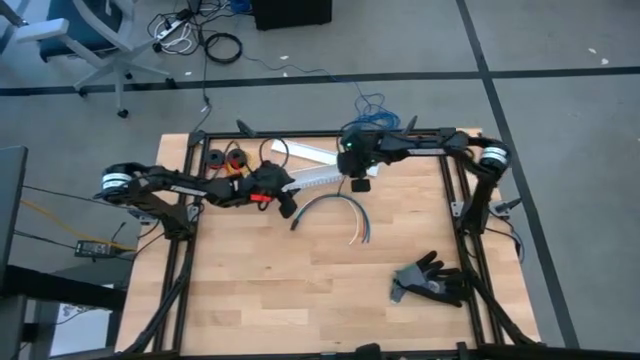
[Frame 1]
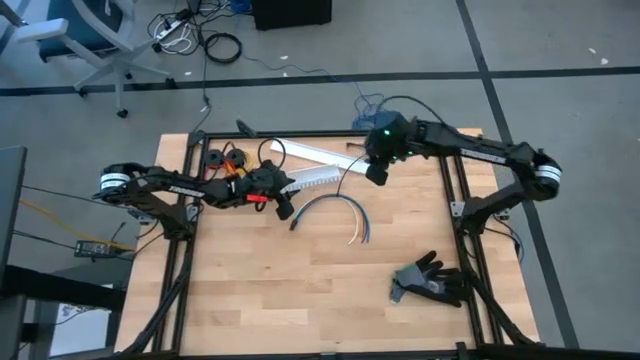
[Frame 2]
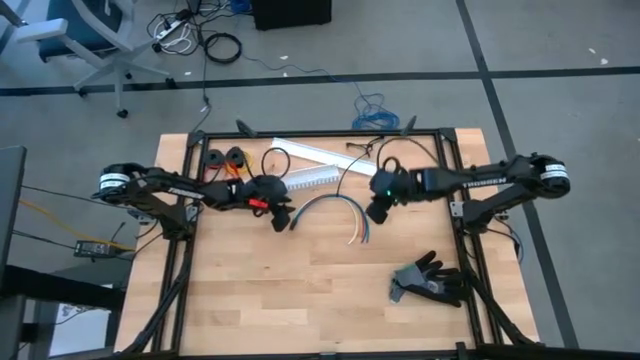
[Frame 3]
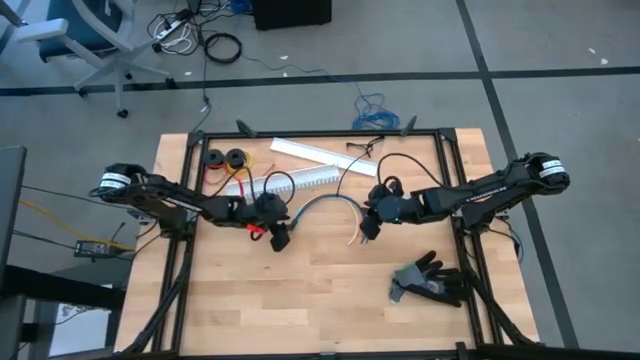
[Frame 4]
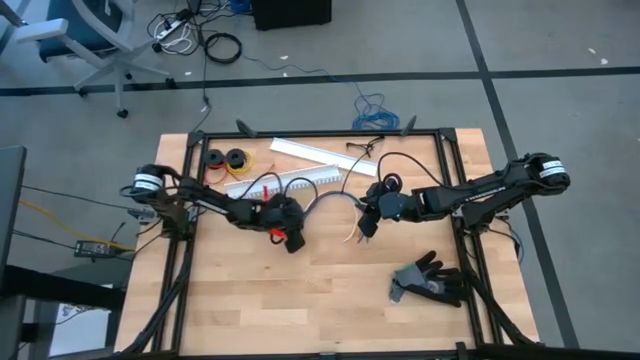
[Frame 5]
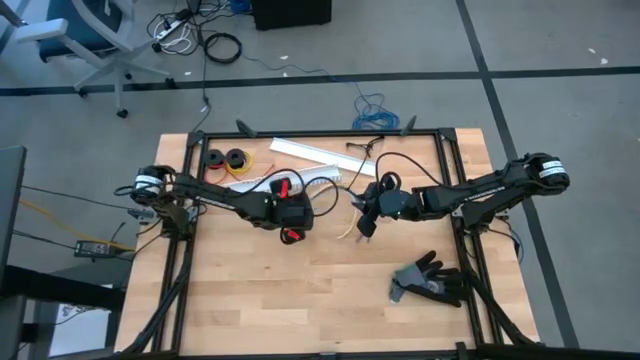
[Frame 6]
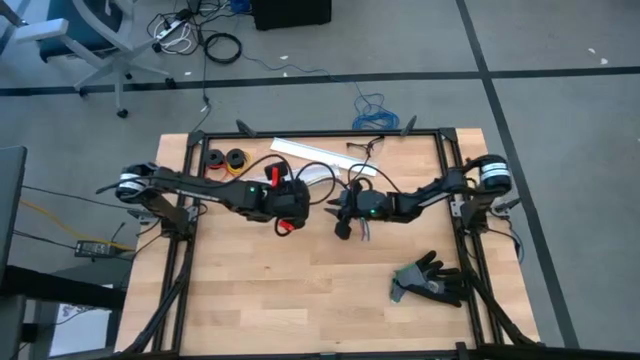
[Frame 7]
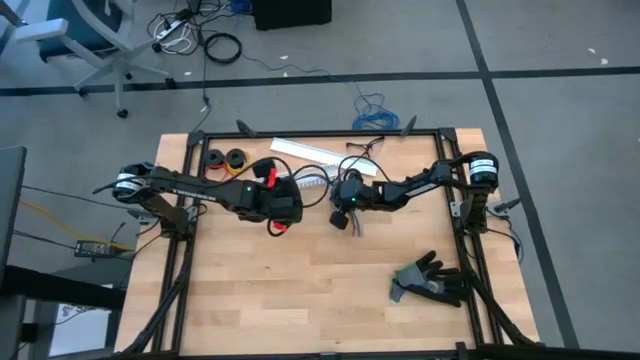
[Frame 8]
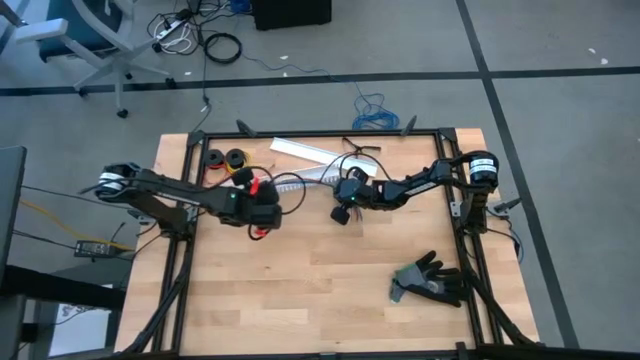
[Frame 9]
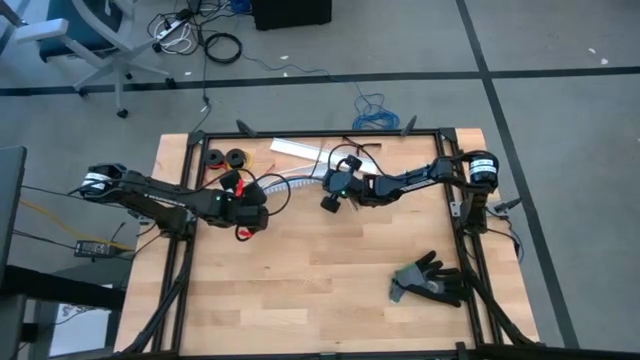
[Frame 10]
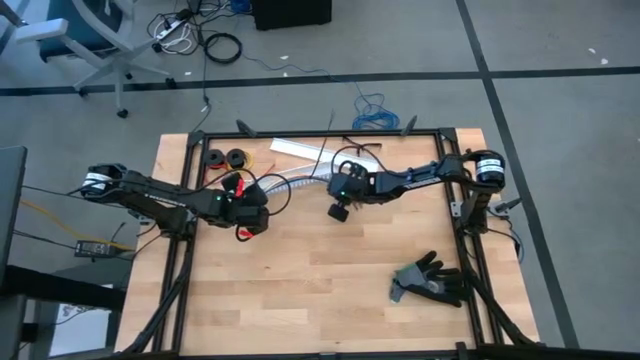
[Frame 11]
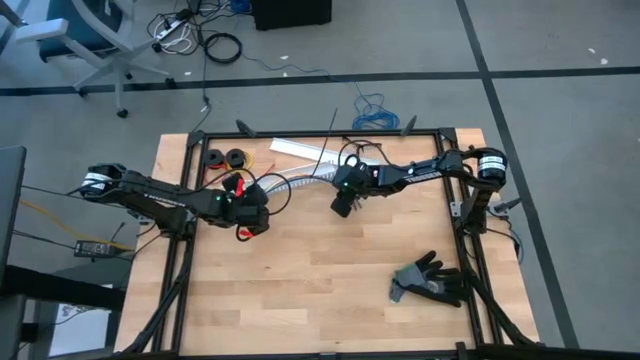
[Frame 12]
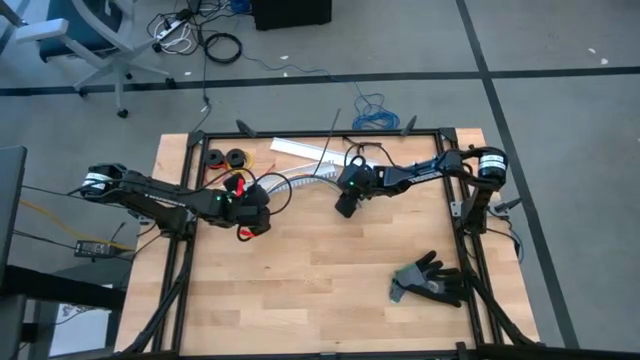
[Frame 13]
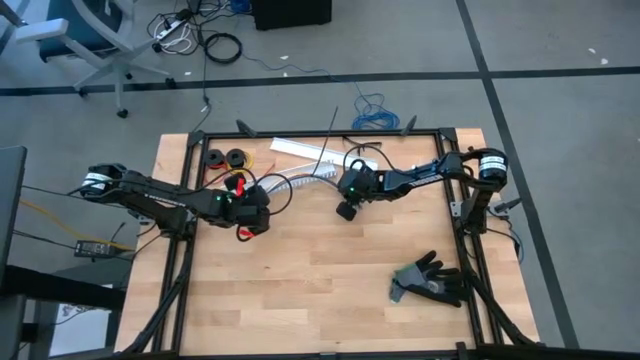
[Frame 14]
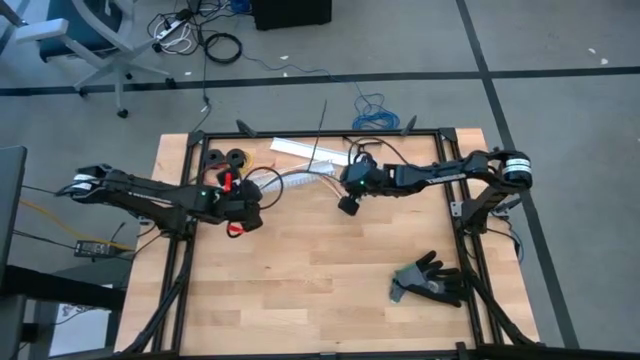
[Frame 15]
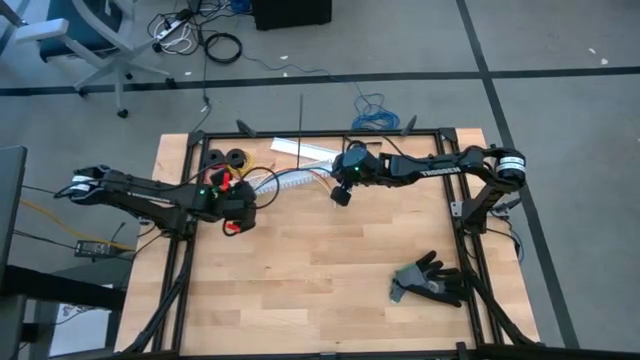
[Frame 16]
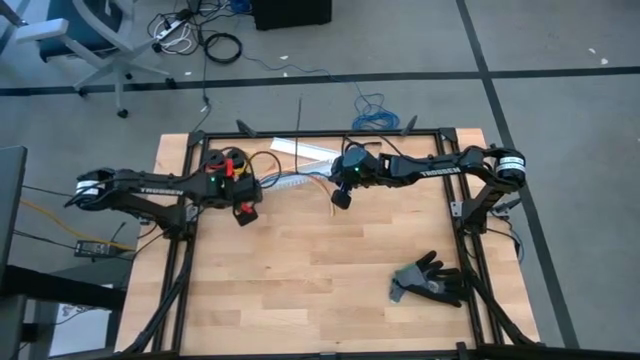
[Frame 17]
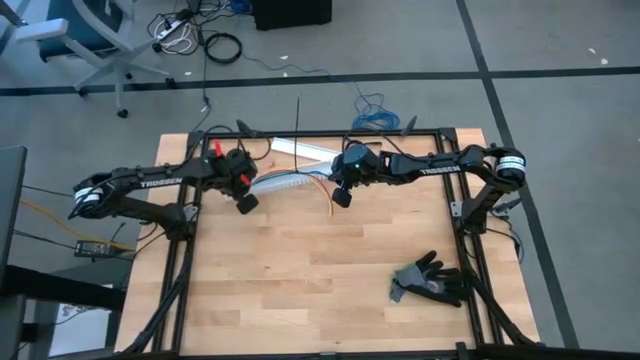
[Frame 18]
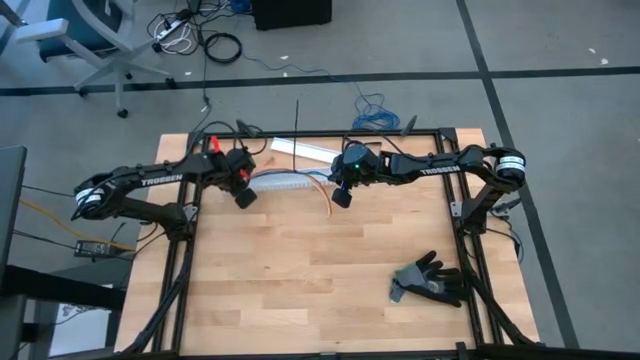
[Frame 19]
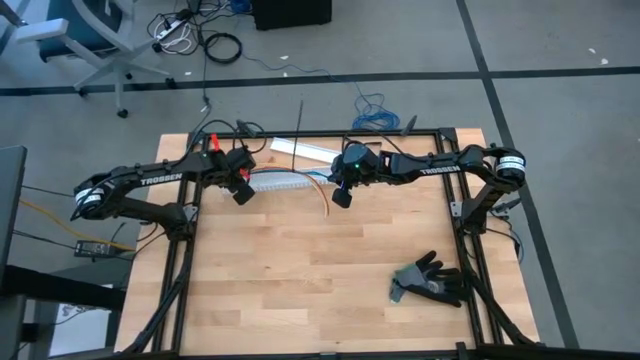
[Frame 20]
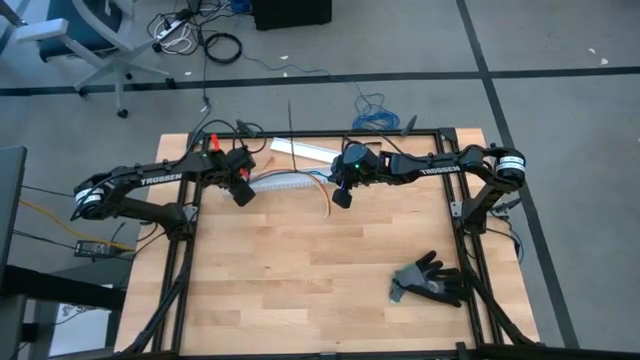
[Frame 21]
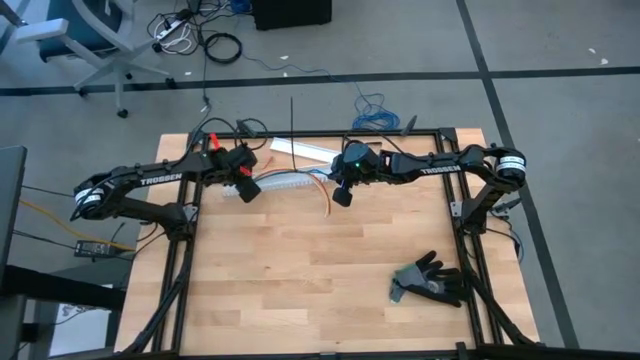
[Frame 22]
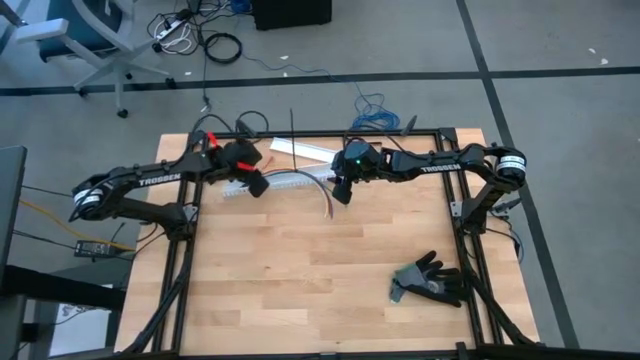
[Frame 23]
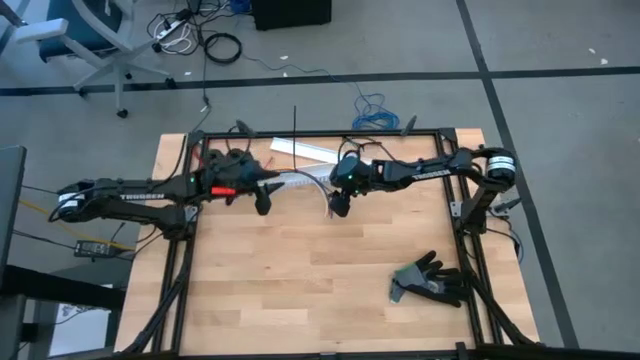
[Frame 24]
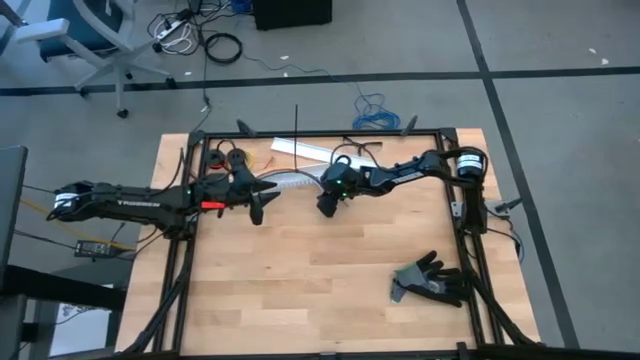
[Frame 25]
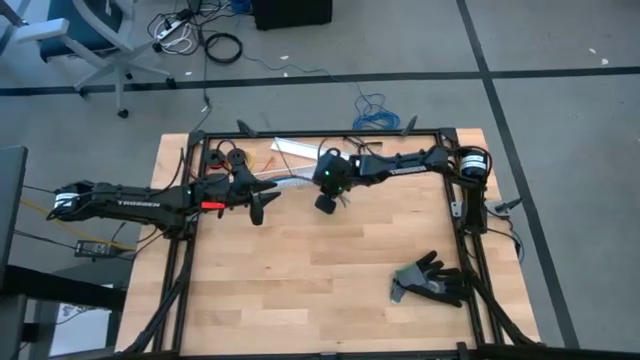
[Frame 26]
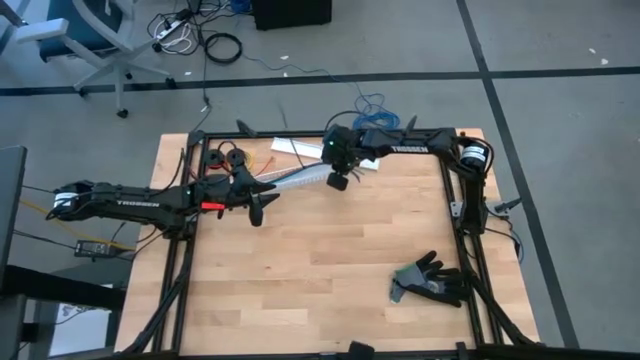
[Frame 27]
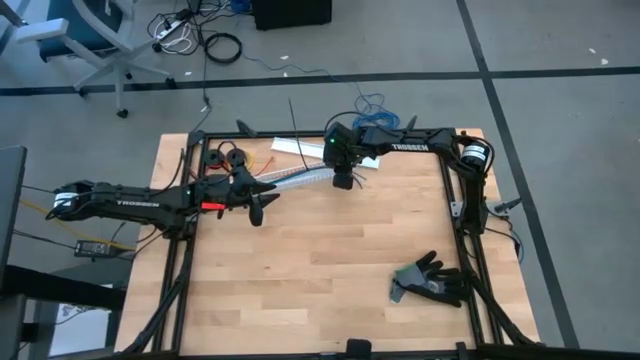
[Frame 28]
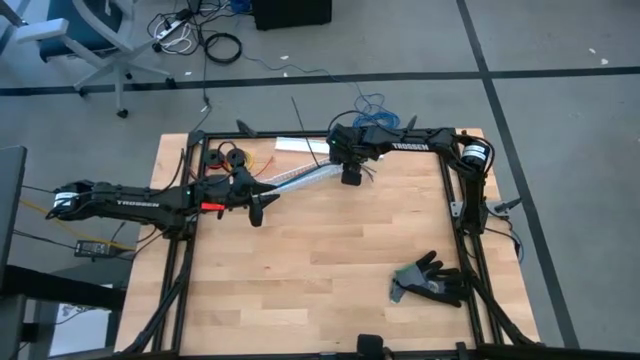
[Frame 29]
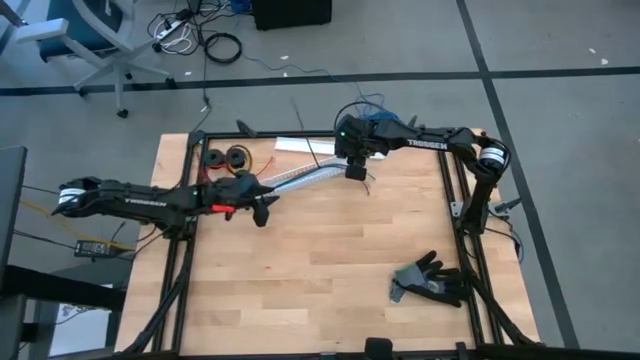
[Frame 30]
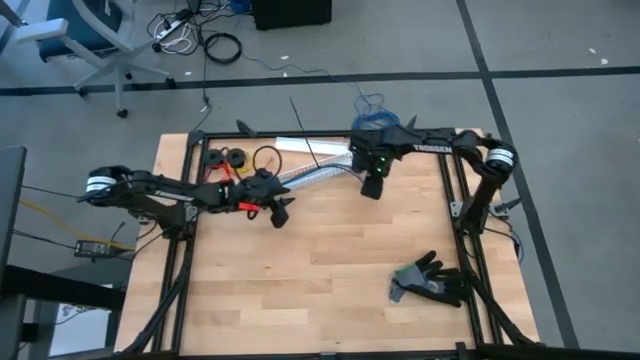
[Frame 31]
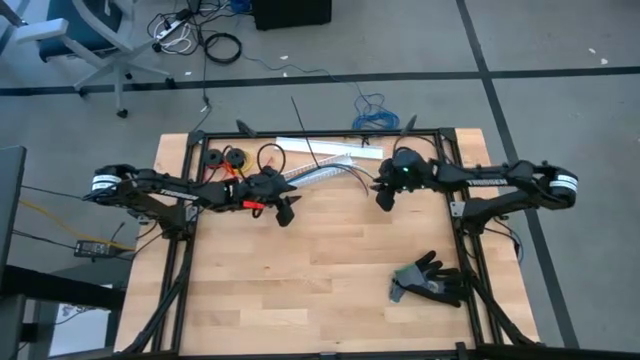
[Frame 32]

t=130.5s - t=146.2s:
Task: Ziptie cables
Put the zip tied cables in the cable duct

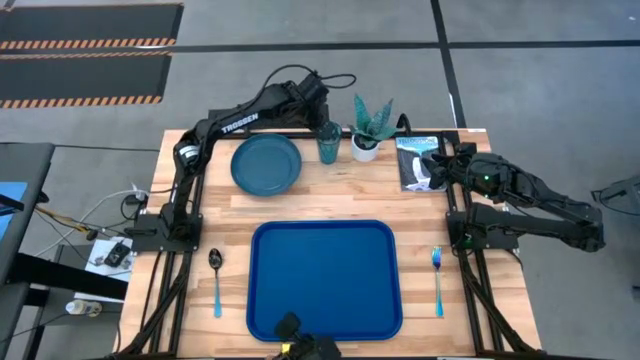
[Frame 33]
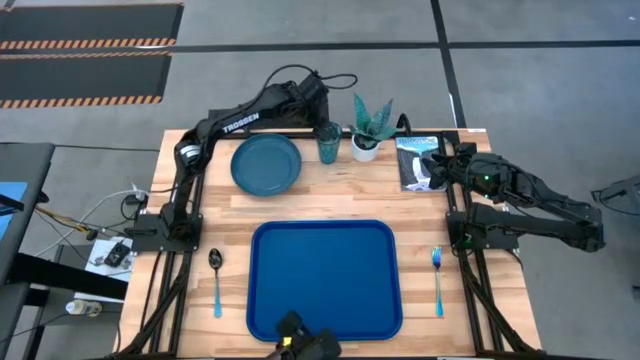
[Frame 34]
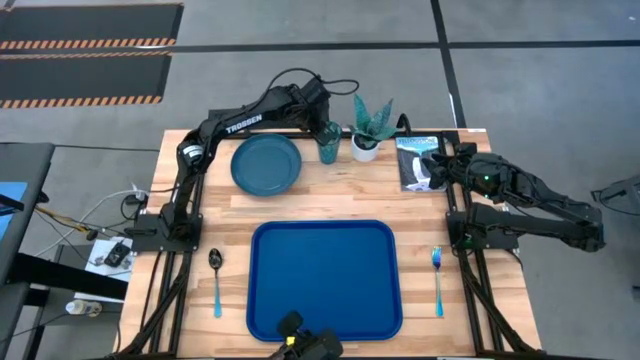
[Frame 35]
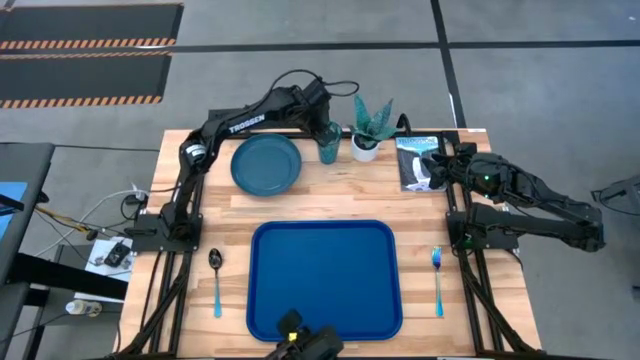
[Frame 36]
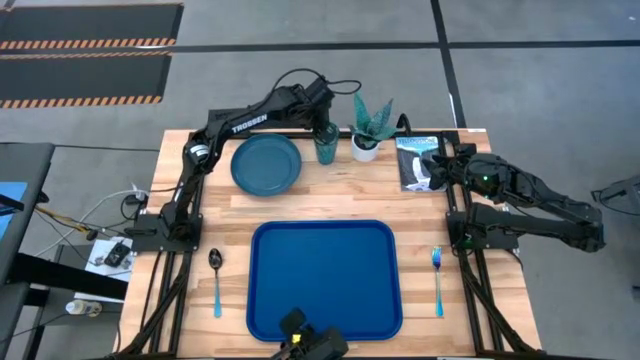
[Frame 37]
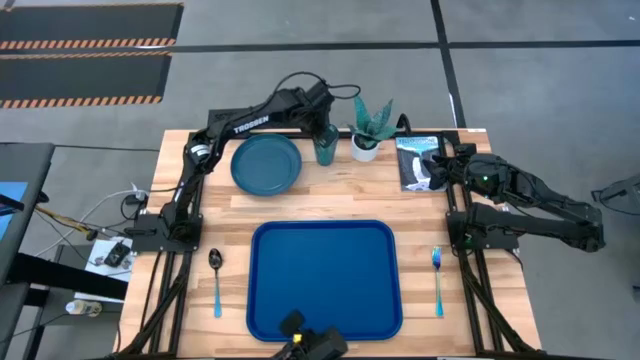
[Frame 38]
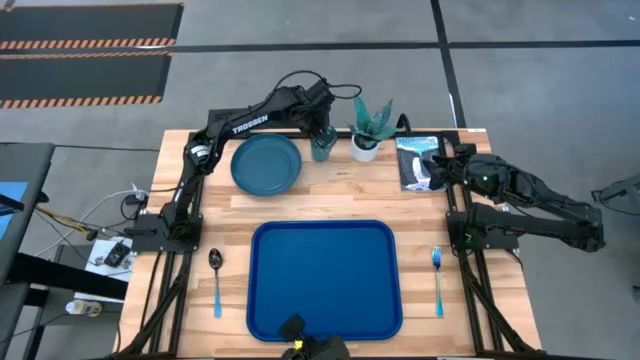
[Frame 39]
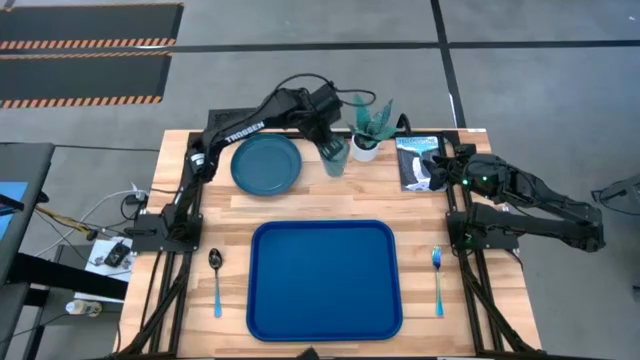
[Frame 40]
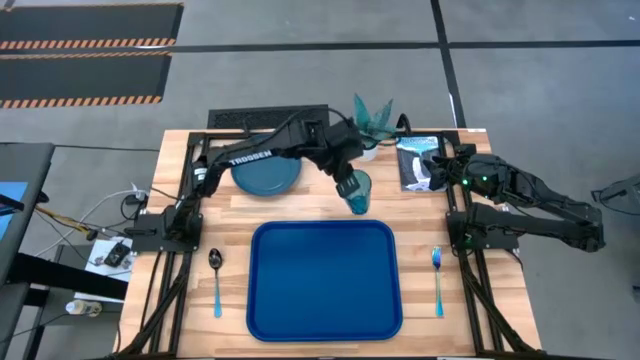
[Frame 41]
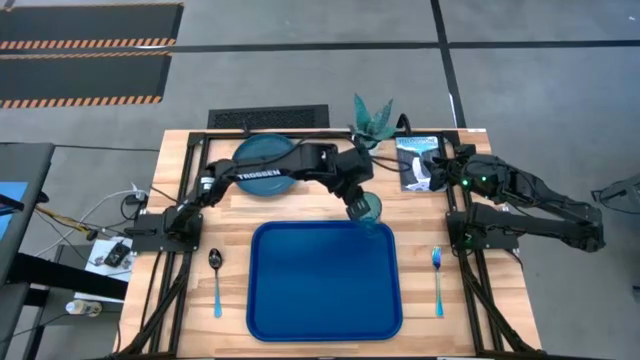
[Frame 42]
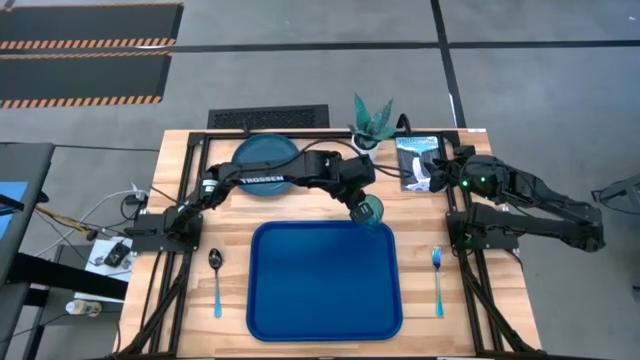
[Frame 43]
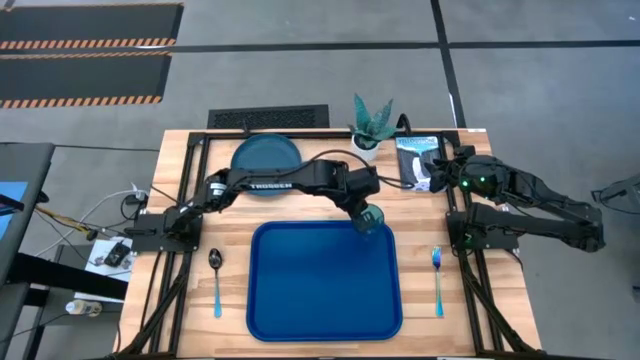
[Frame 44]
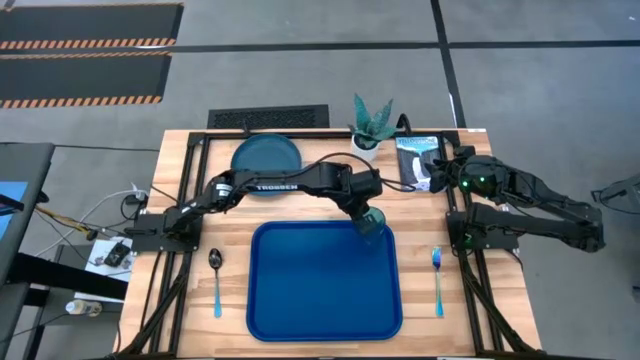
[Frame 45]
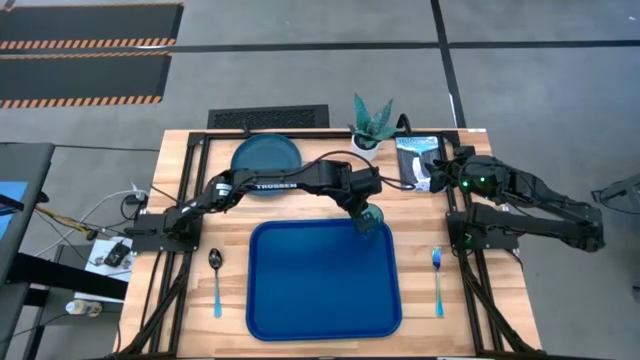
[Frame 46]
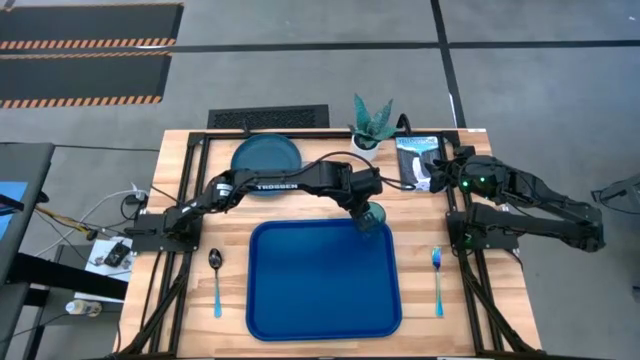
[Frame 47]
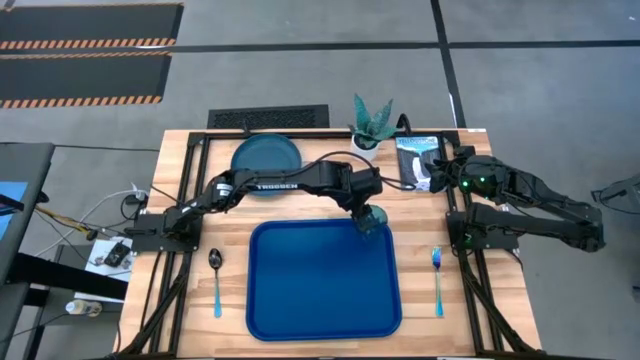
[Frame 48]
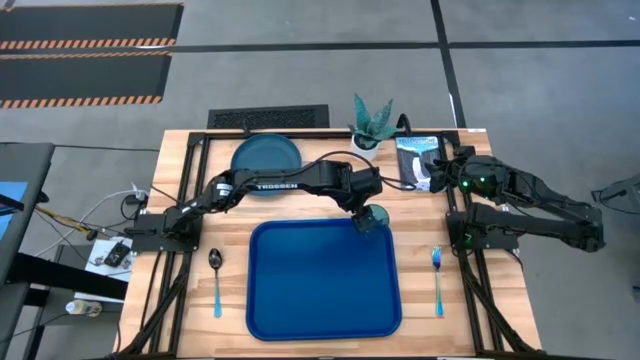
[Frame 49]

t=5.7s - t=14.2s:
Task: Pick and place plate/cup/fork/spoon on tray
Put the blue cup on the top right of the blue tray
